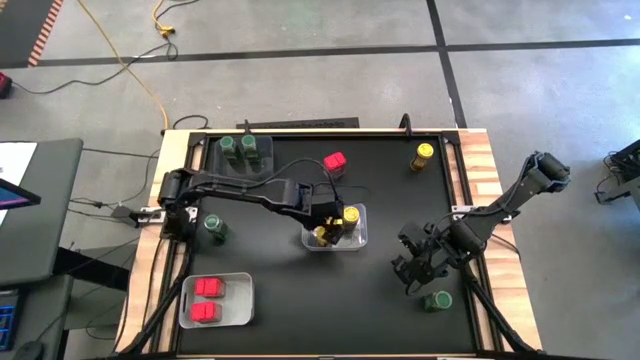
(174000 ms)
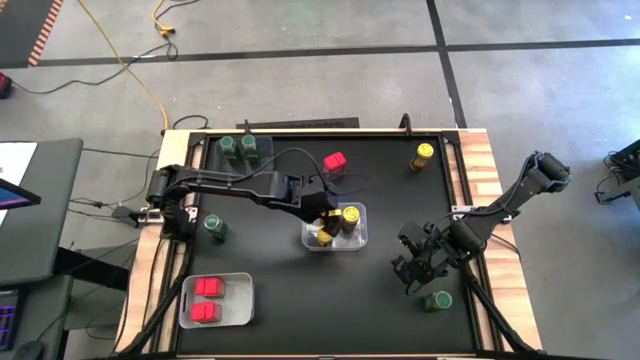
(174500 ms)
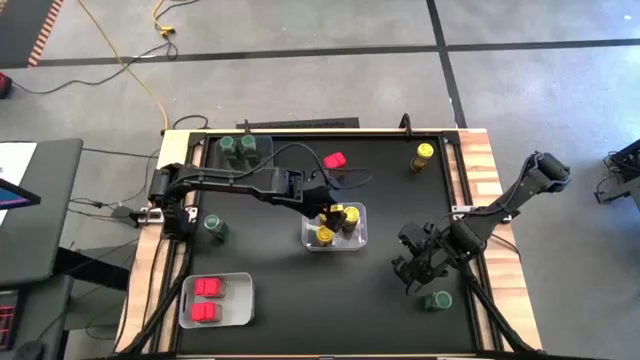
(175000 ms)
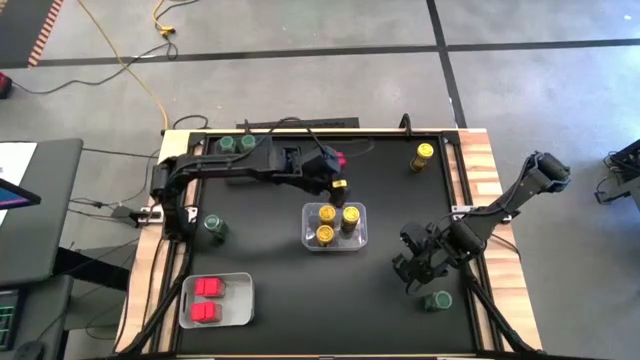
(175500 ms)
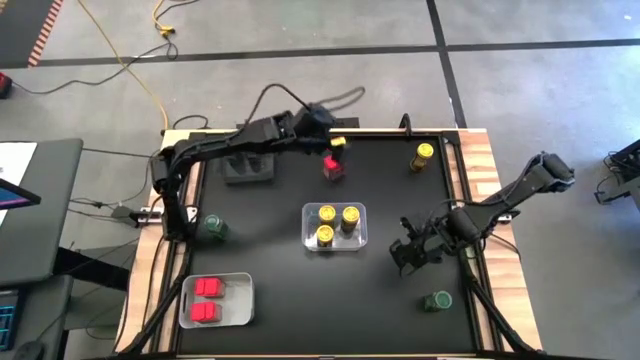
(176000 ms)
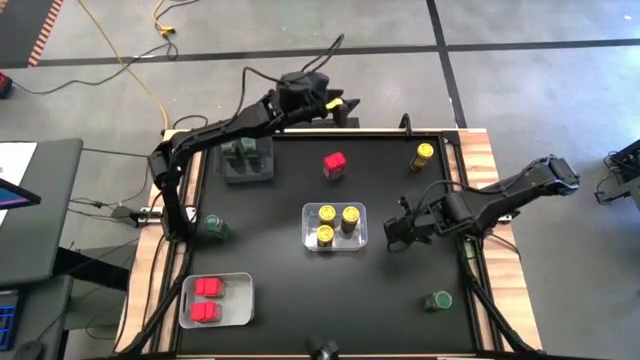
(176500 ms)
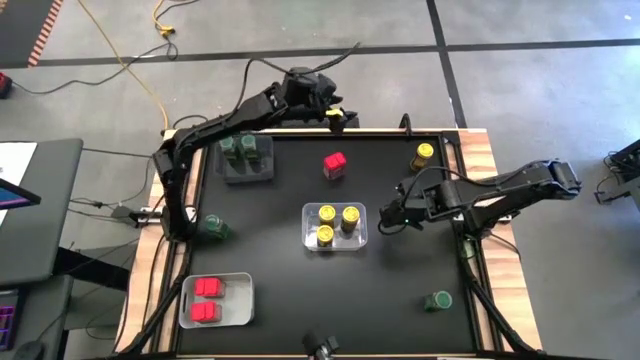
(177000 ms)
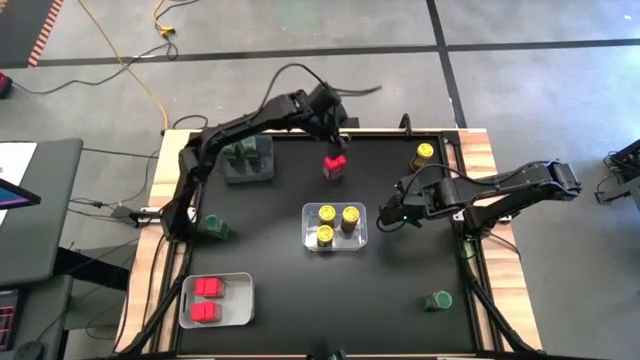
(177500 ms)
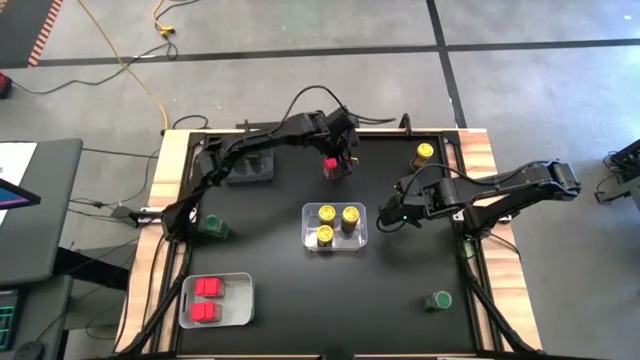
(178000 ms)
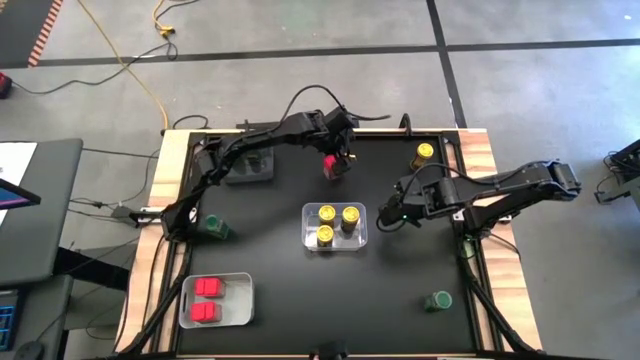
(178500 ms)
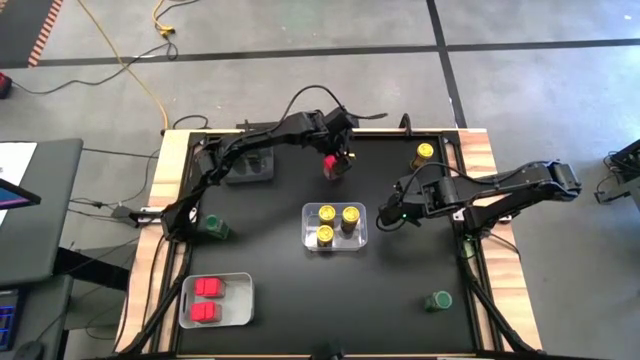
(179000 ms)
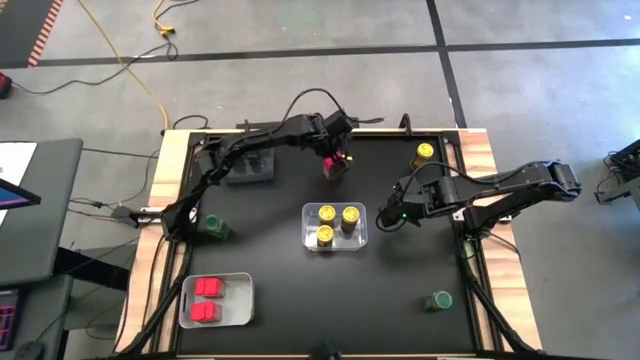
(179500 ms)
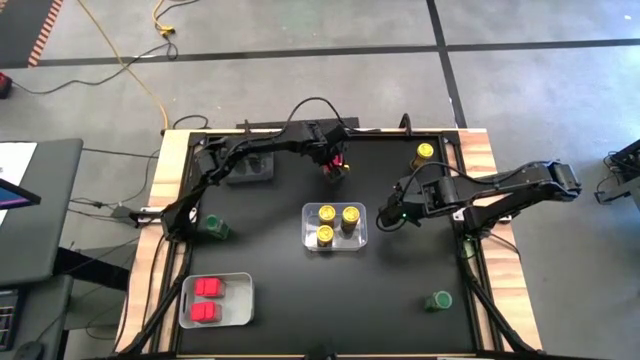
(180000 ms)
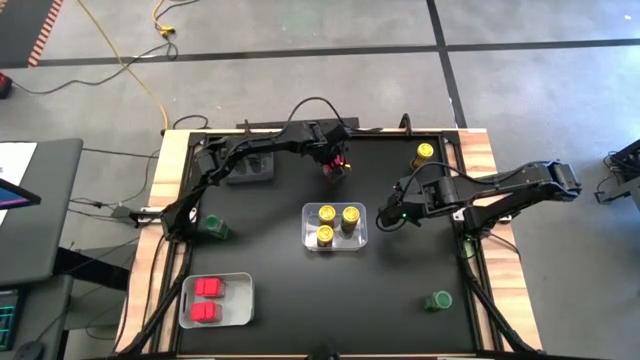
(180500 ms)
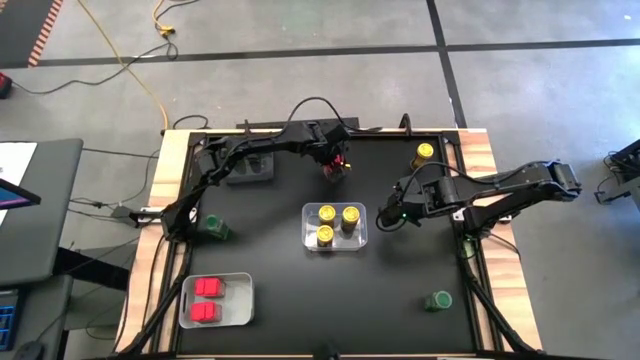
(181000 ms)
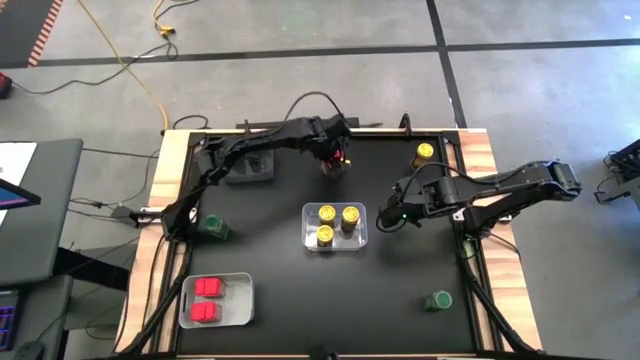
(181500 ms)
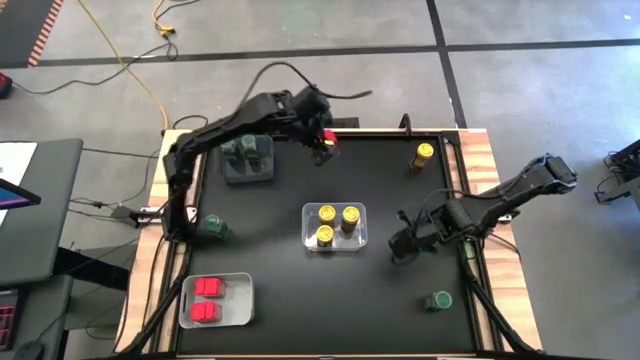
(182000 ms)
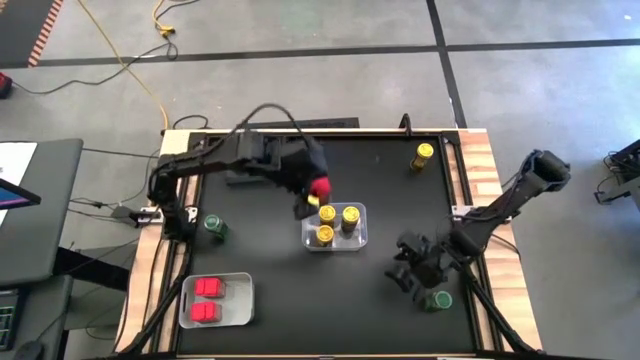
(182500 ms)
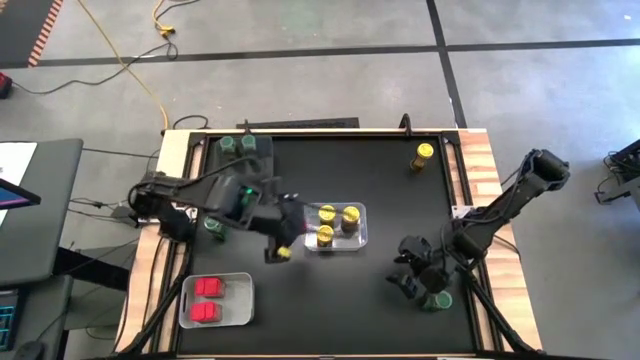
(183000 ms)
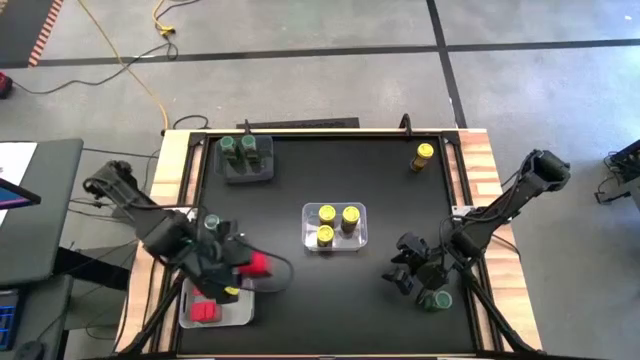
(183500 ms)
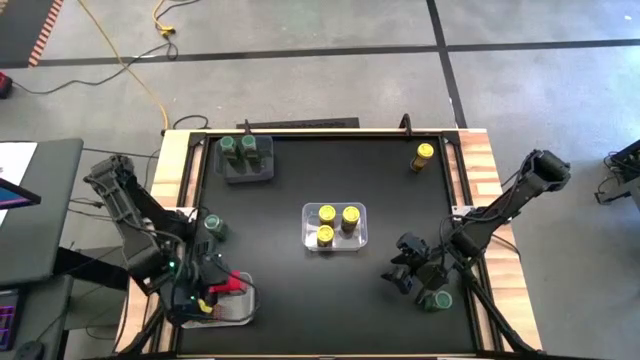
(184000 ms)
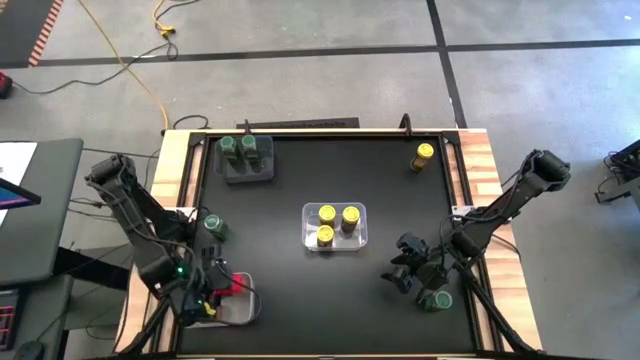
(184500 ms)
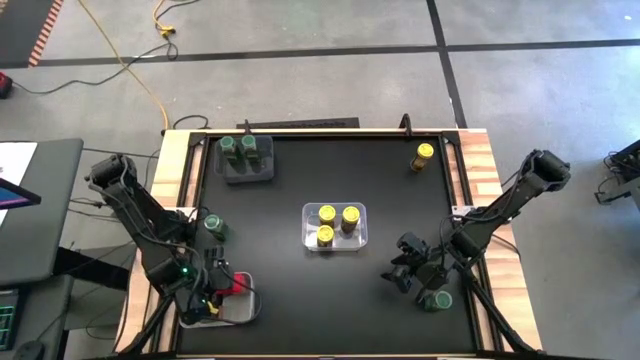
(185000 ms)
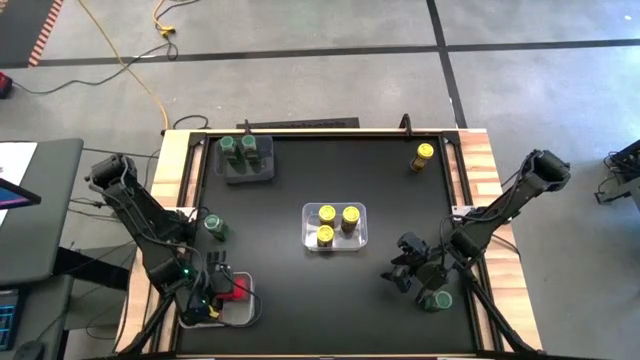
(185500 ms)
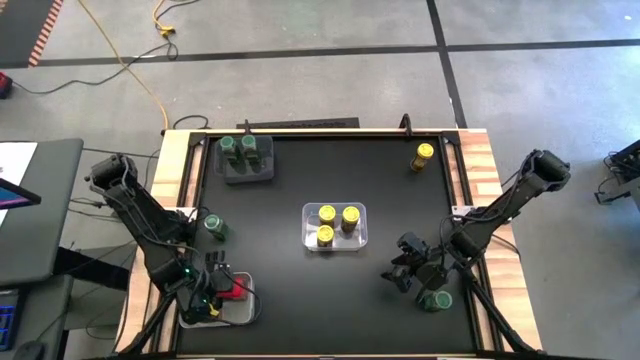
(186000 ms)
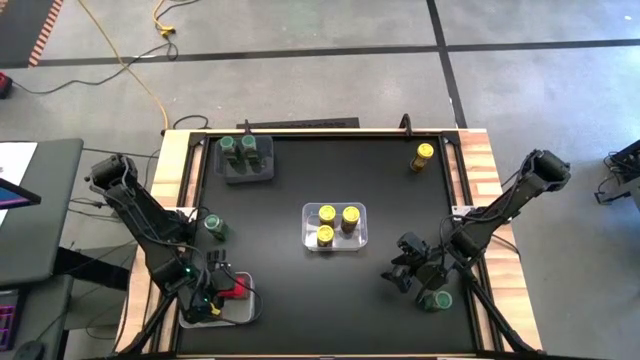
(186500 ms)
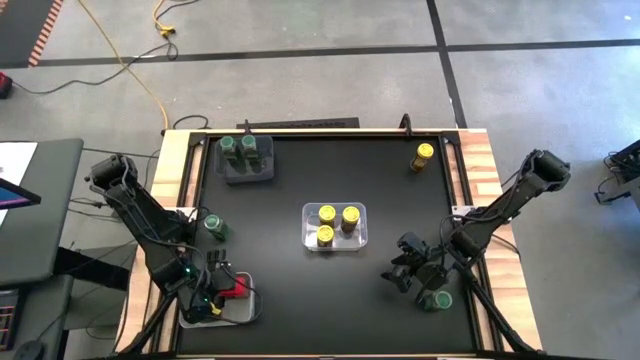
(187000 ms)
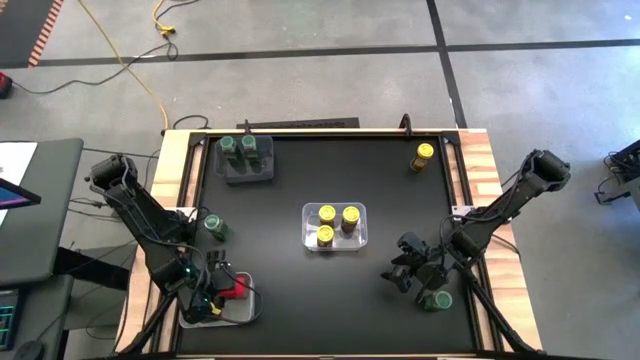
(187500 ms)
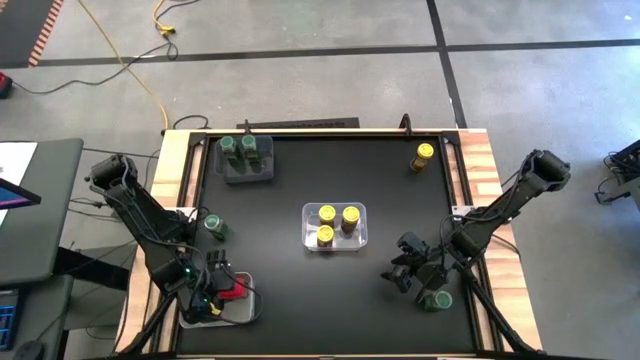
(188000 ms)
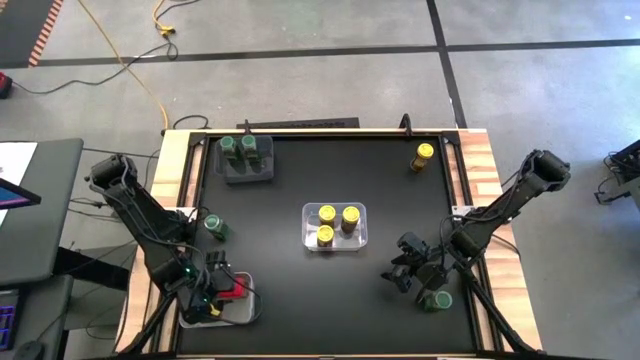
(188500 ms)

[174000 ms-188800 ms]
Task: Sort spices by type
Put the red seasoning can into the gray bin

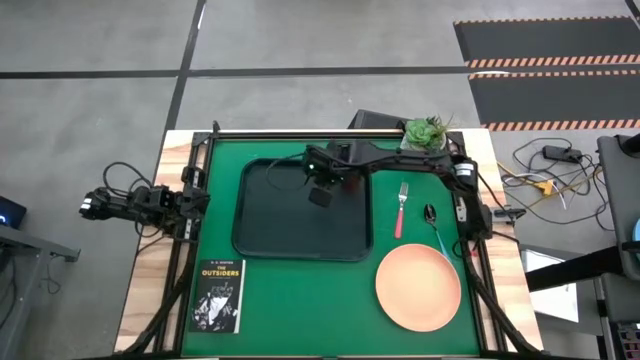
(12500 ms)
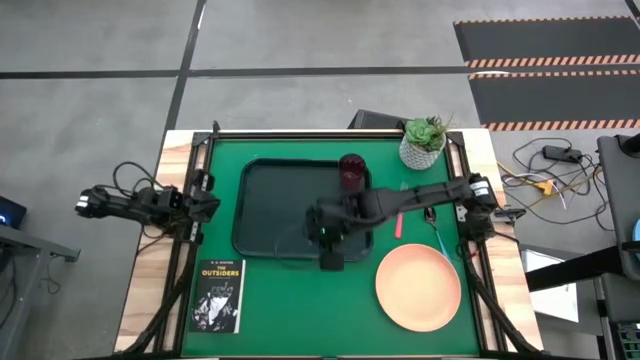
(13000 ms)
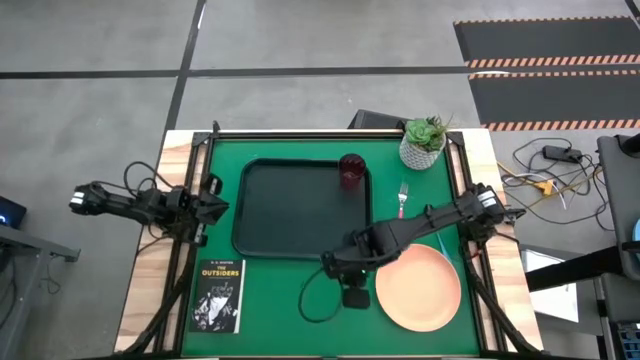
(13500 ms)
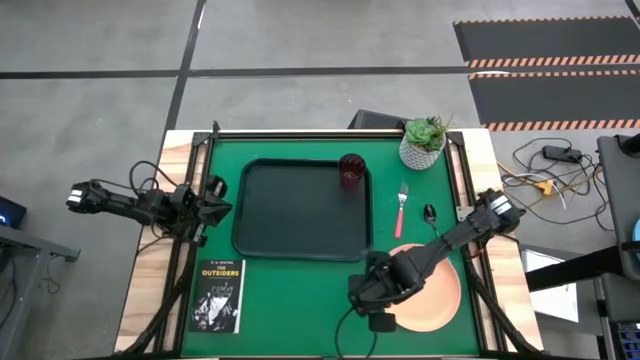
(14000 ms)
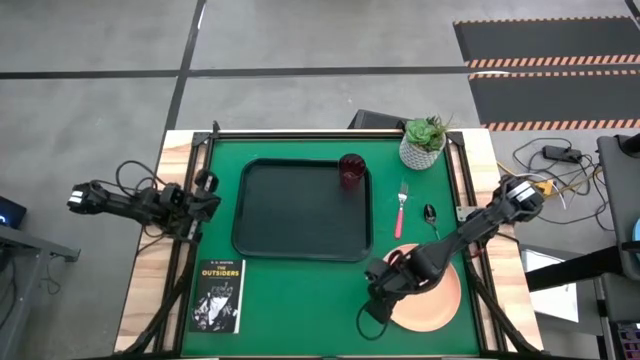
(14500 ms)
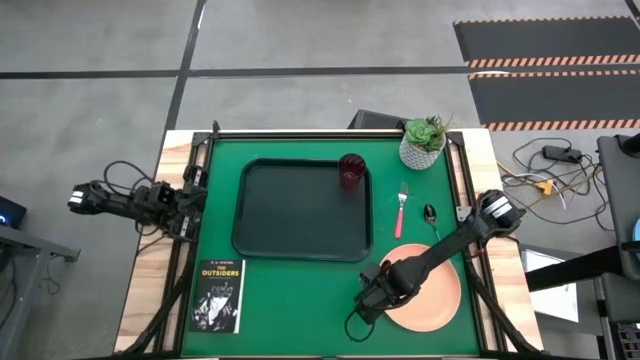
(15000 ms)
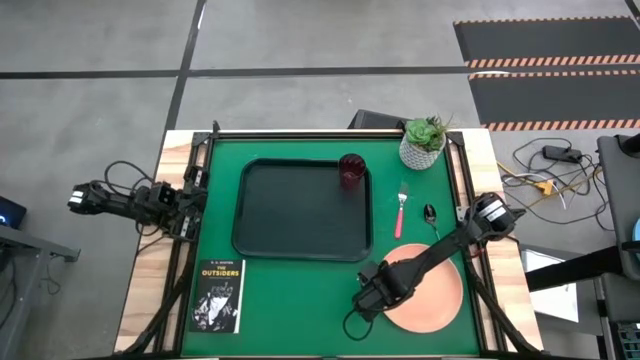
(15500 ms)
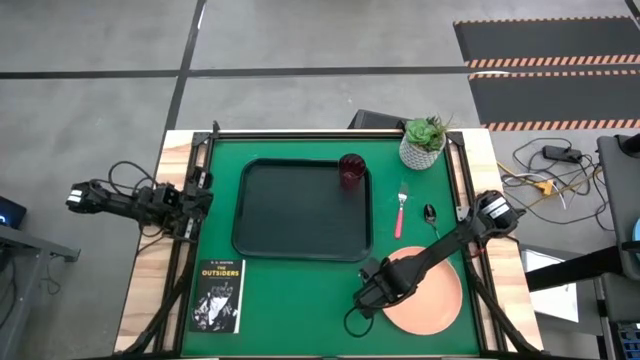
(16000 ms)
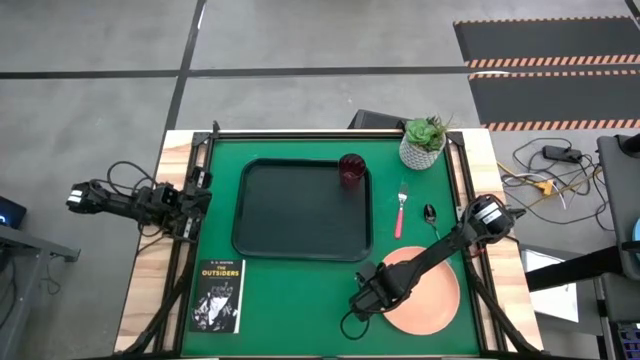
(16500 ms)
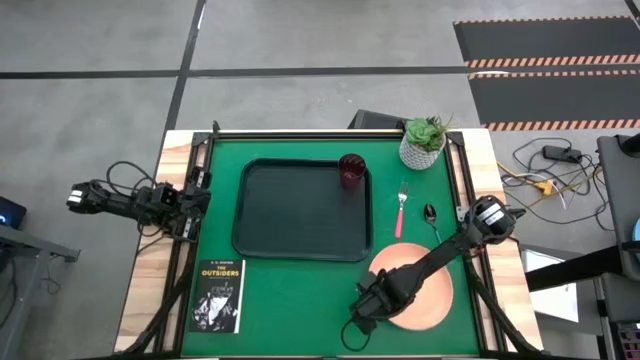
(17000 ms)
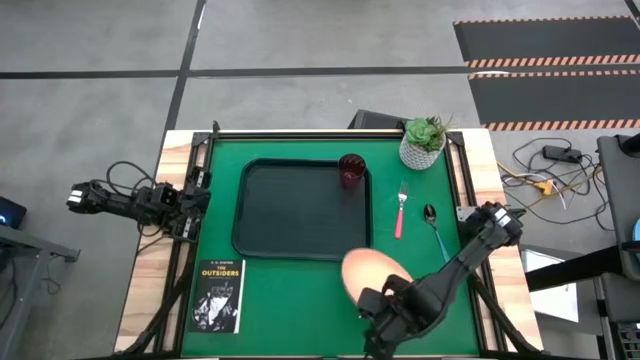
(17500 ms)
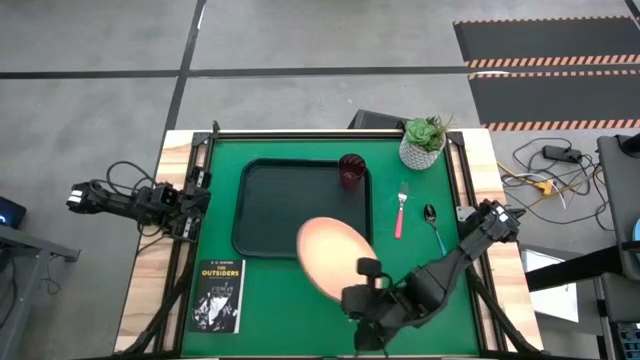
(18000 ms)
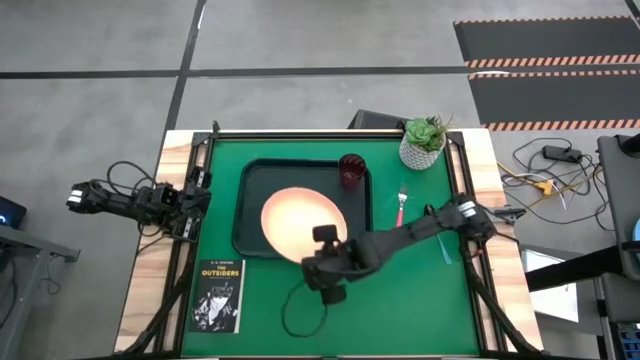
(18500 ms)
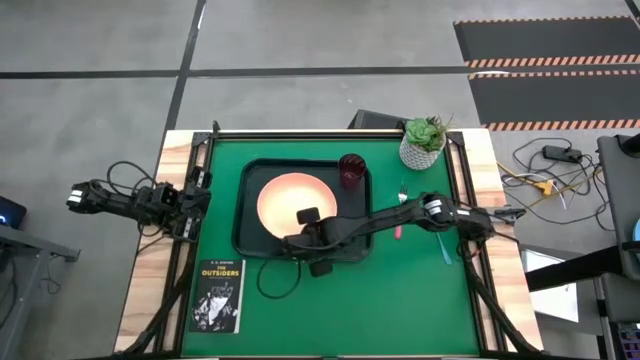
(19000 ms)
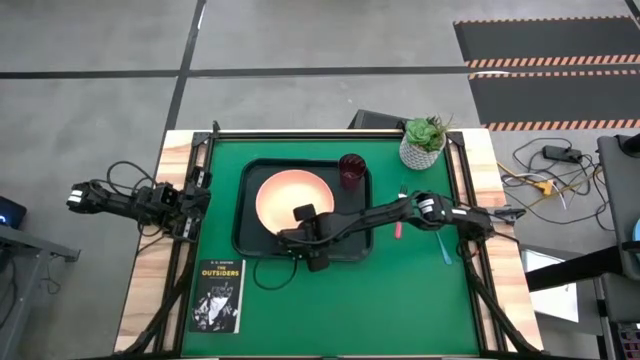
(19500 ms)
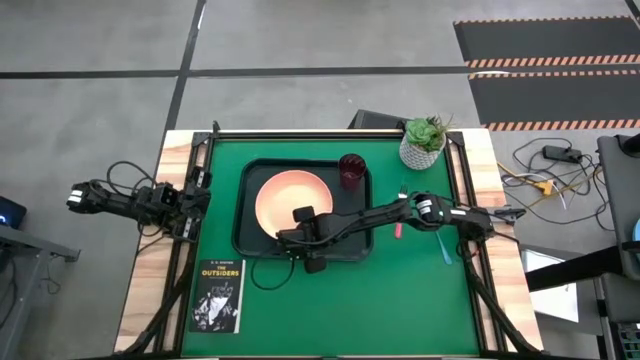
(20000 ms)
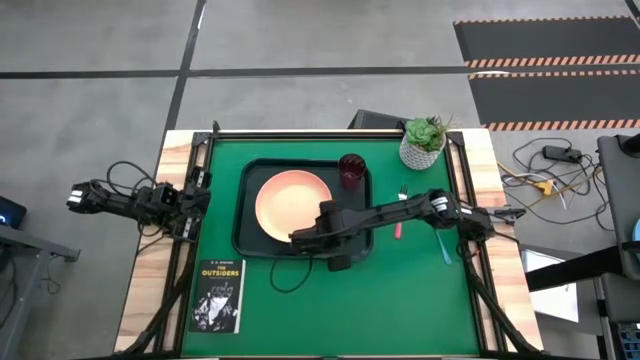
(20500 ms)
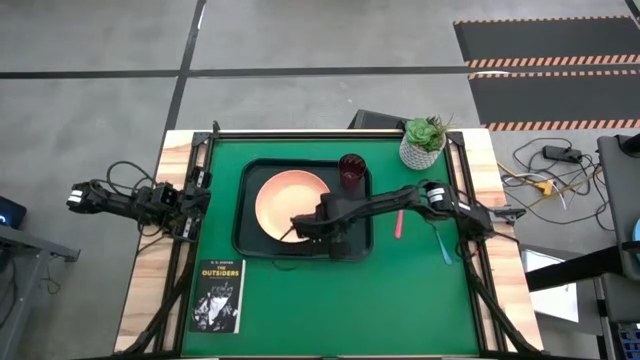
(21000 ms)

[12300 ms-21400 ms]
Task: Pick and place plate/cup/fork/spoon on tray
Put the orange plate on the black tray
